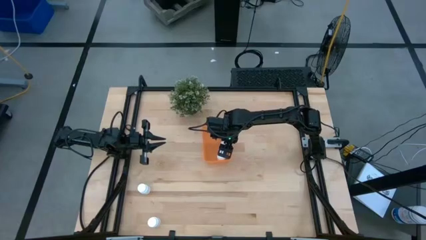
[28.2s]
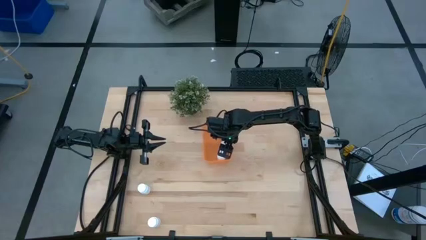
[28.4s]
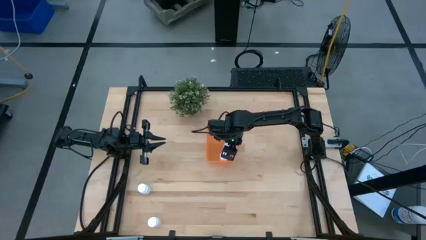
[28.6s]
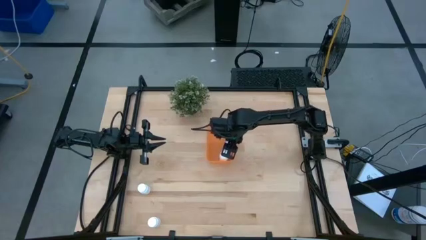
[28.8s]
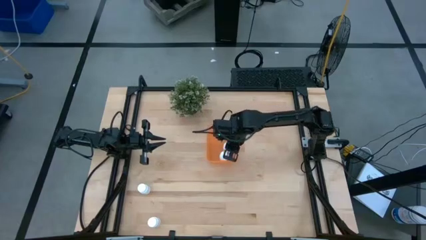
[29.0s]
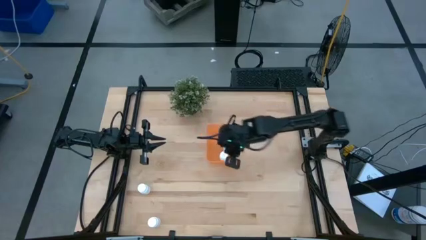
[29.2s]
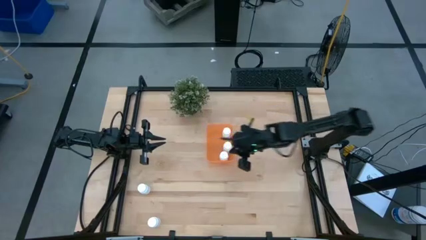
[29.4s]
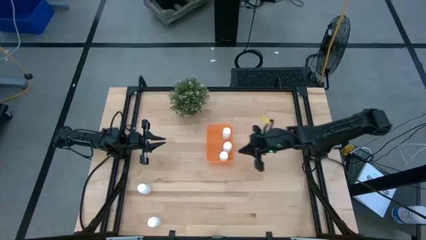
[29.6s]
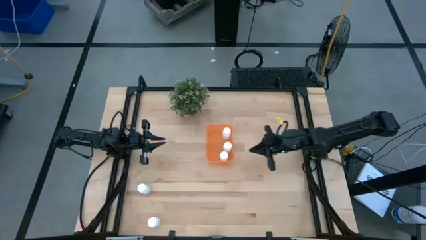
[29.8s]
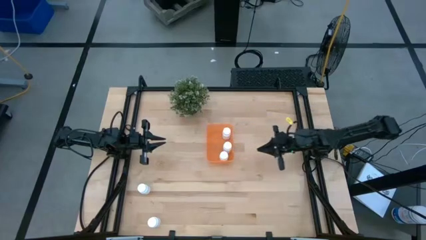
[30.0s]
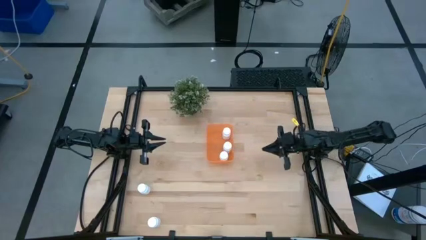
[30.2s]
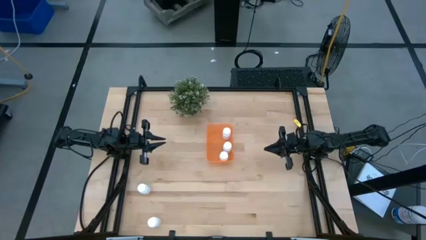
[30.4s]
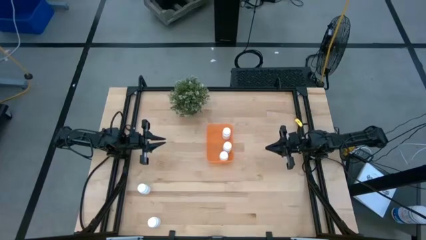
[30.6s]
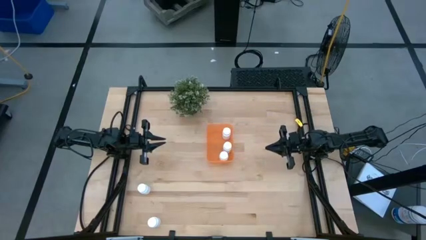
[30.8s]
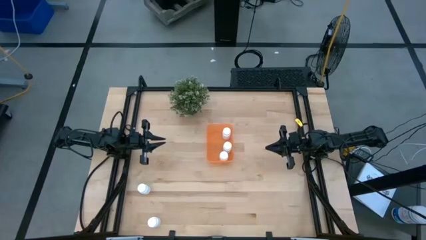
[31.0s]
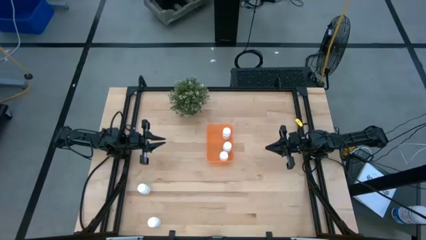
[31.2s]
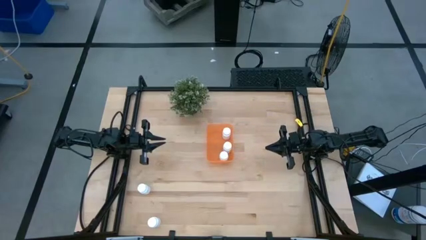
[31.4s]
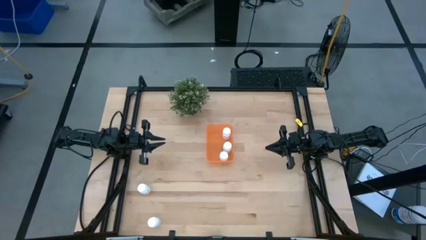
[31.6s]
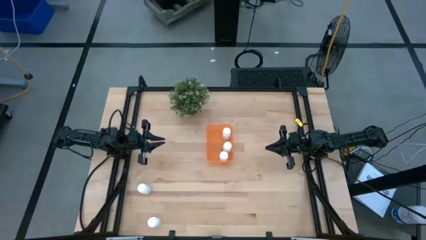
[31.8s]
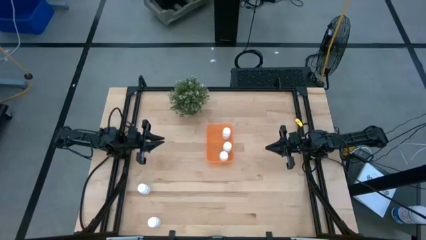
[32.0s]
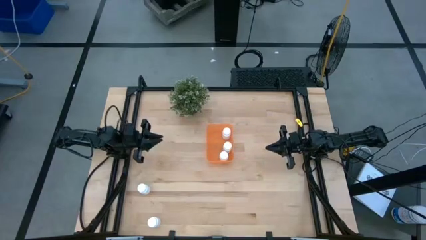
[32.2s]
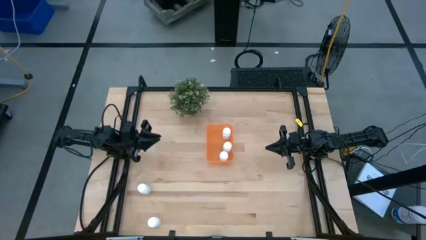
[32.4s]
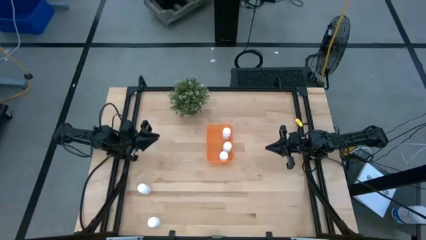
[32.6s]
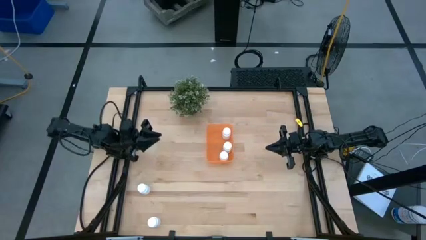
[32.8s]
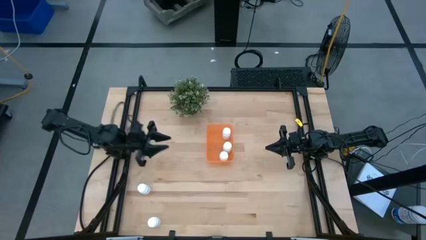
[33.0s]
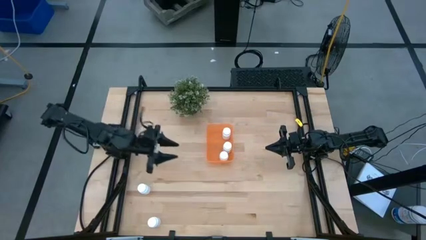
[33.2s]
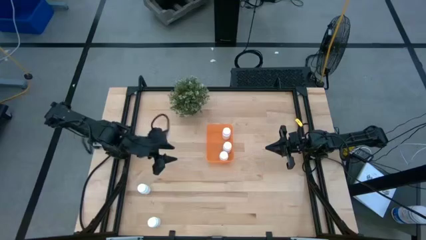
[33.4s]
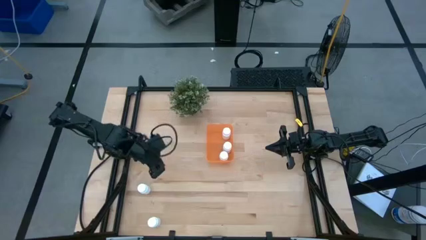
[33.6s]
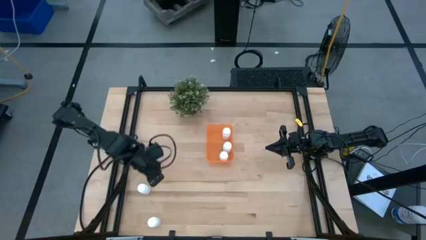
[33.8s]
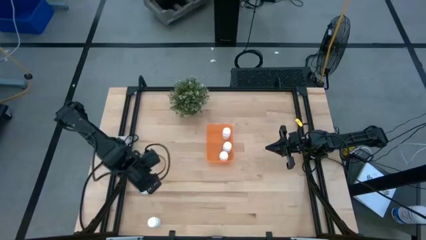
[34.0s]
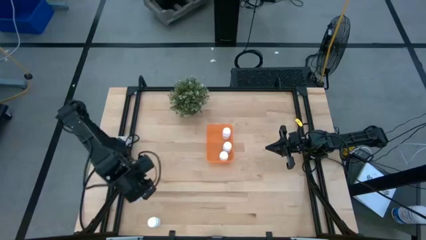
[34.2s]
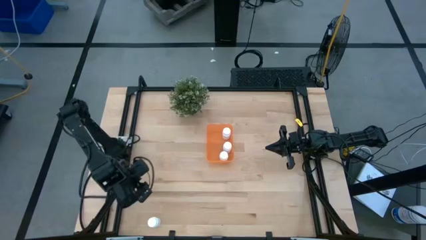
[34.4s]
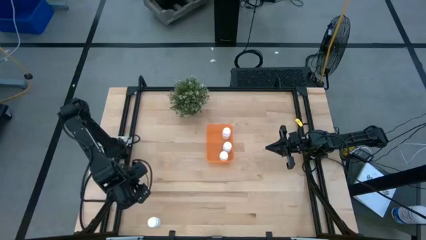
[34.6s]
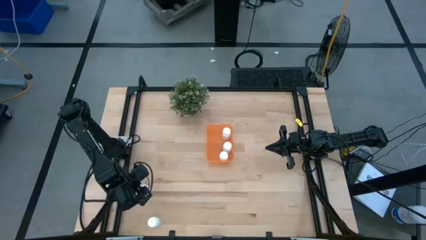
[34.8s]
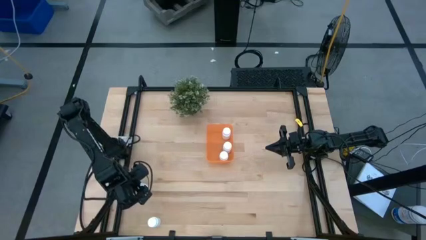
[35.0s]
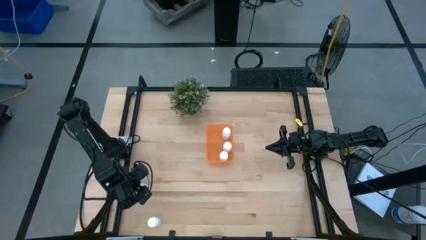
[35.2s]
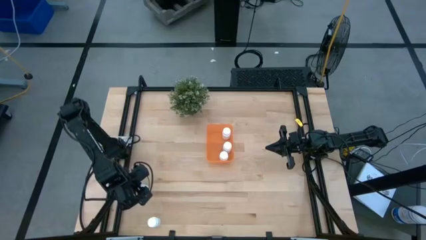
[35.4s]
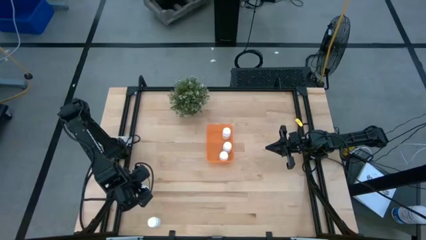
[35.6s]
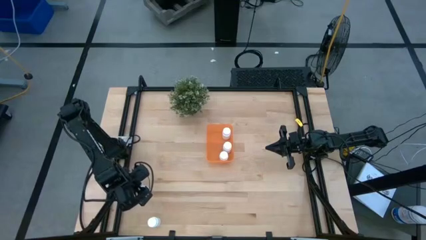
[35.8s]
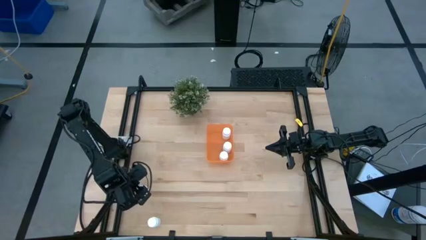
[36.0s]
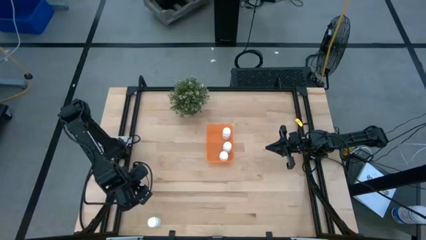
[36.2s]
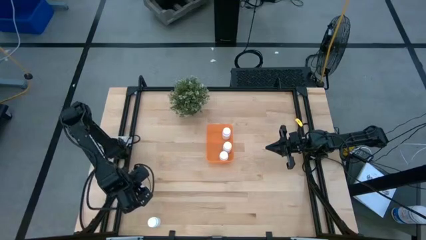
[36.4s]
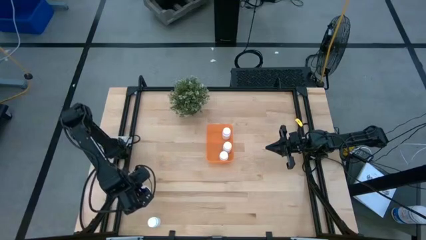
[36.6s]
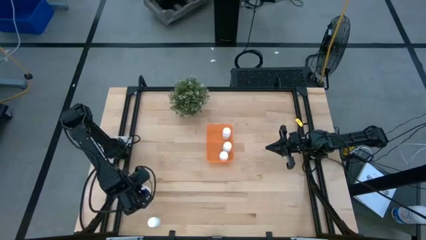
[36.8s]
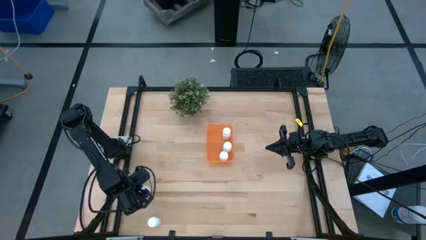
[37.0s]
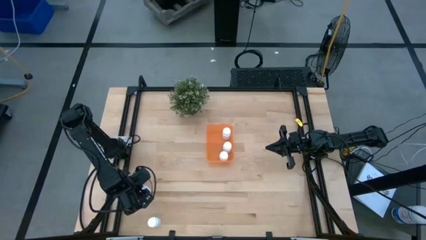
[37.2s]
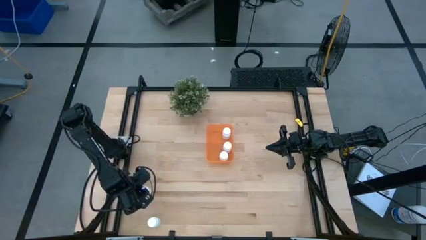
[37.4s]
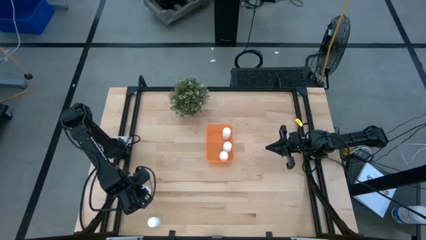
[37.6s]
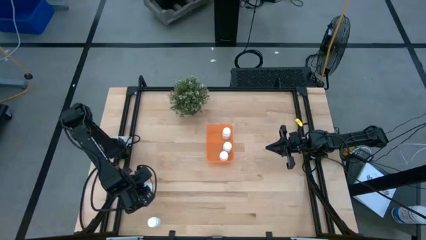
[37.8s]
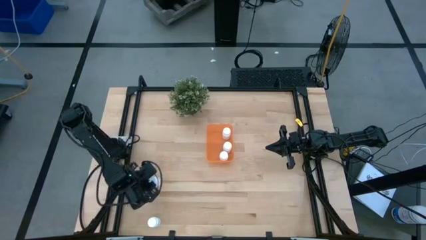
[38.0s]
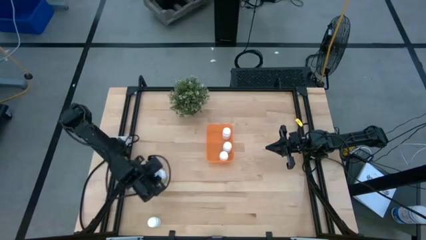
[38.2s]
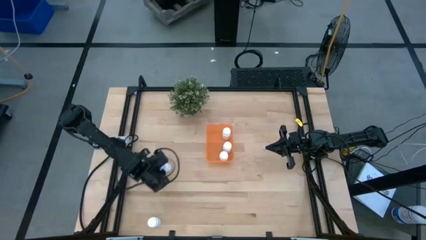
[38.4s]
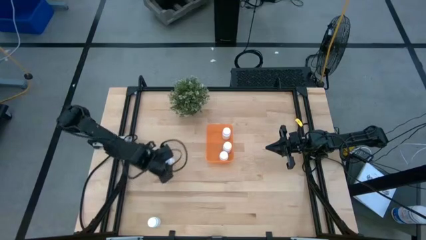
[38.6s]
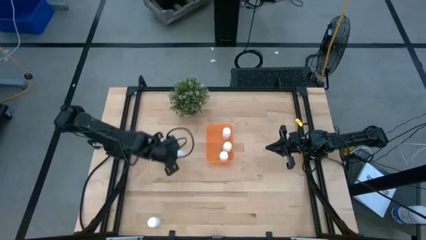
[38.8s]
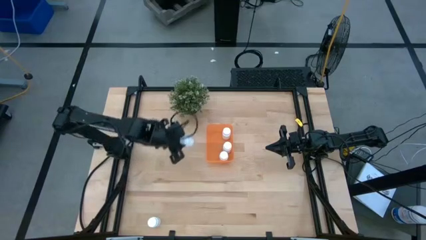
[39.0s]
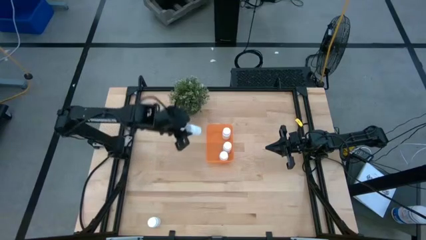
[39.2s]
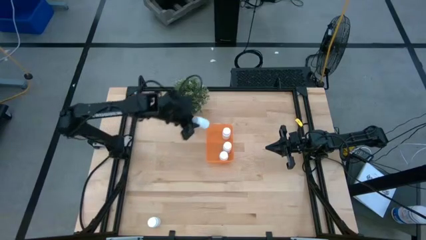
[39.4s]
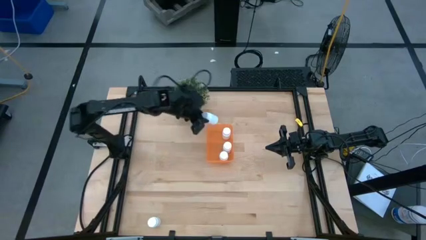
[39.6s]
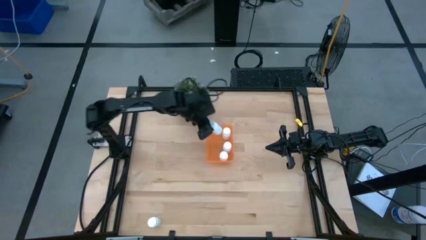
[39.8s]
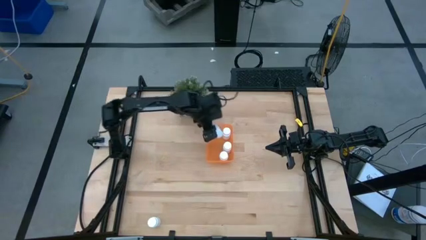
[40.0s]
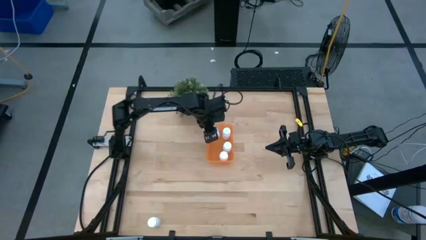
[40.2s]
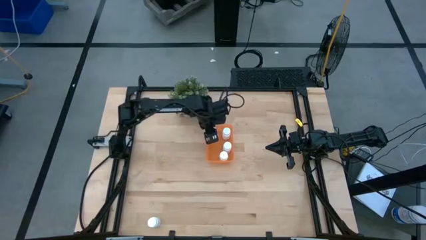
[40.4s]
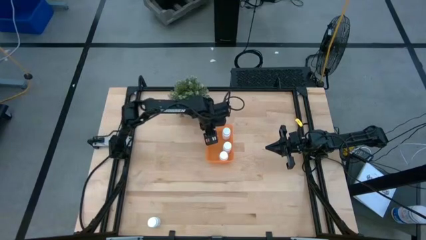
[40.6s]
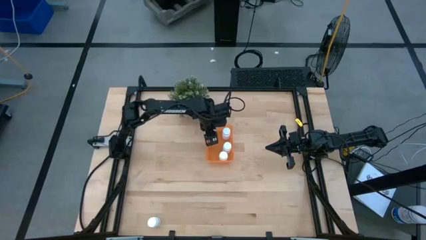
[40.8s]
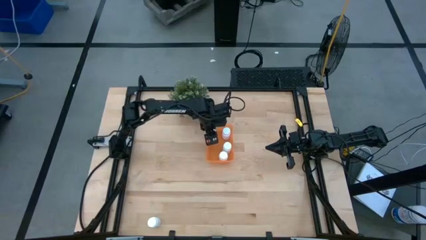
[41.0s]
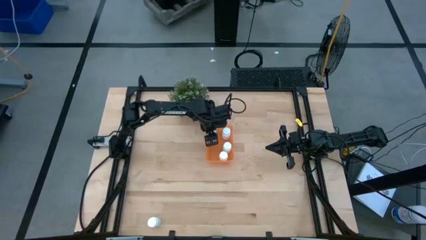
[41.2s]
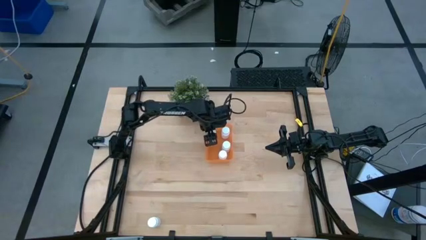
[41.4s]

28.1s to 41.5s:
Task: Pick and place pill bottles into a basket
Put the white medicine bottle into the orange bin
